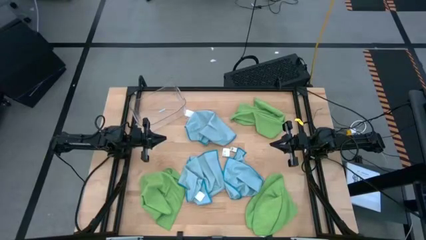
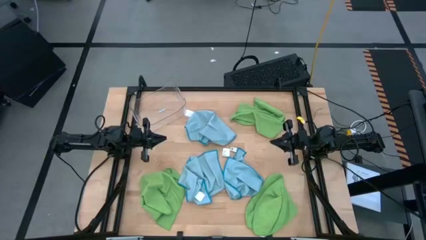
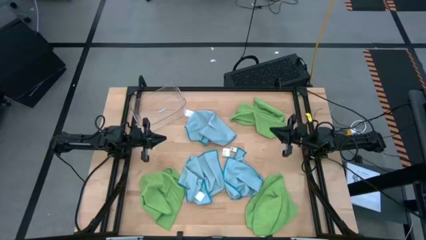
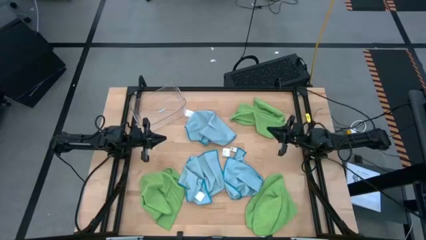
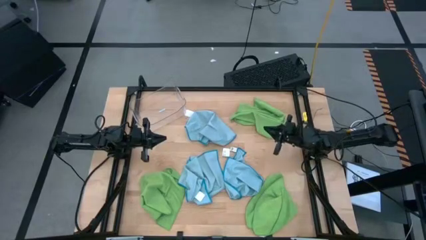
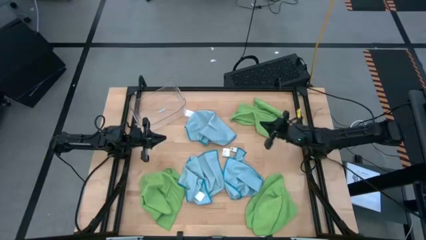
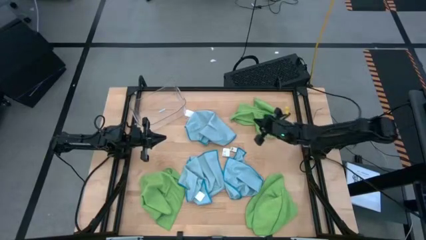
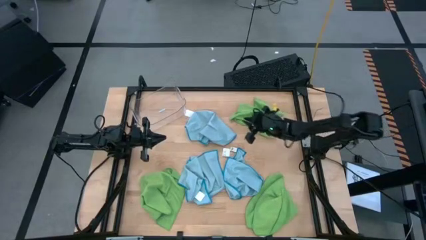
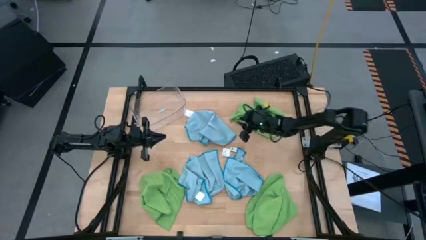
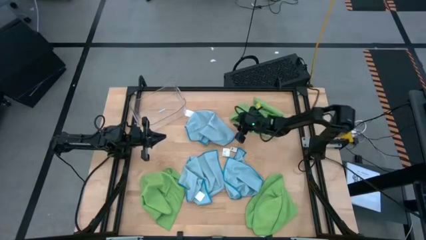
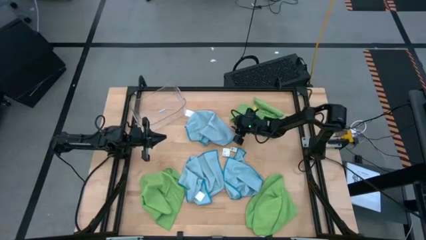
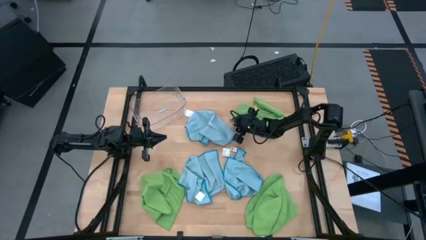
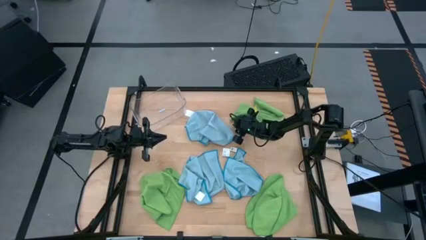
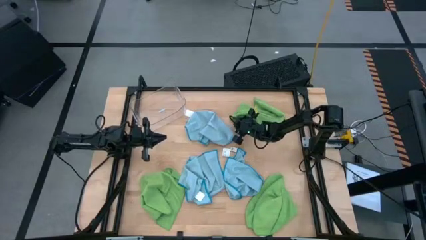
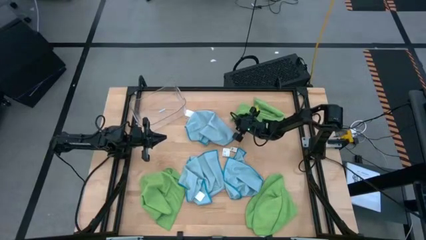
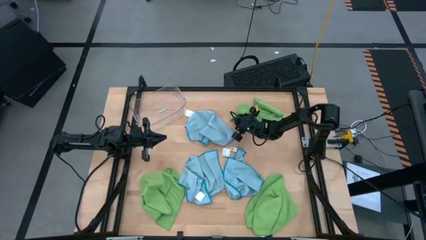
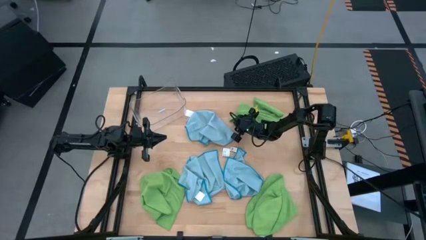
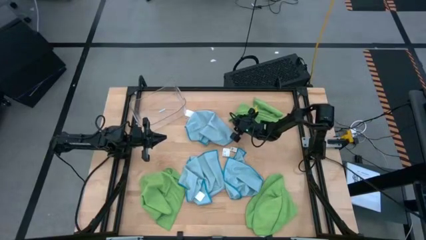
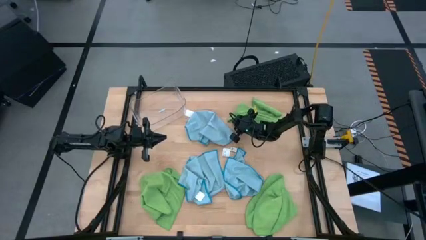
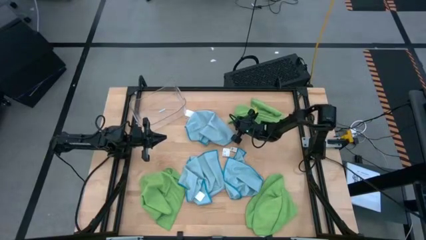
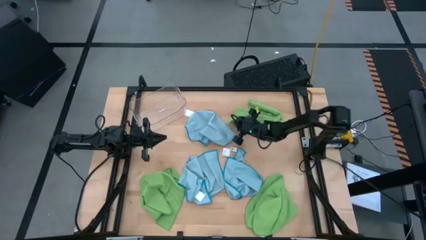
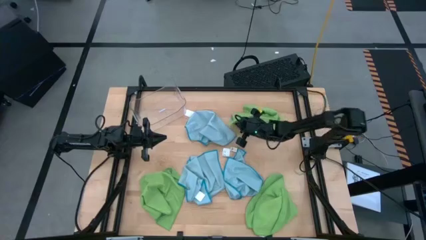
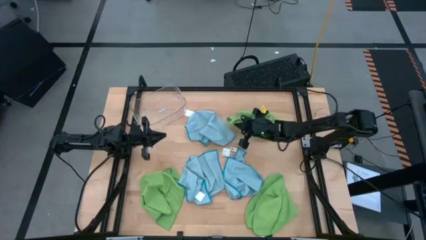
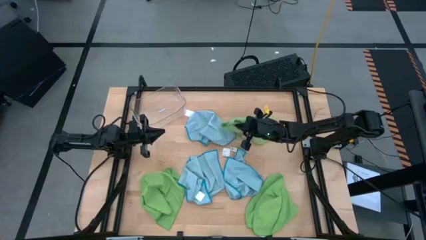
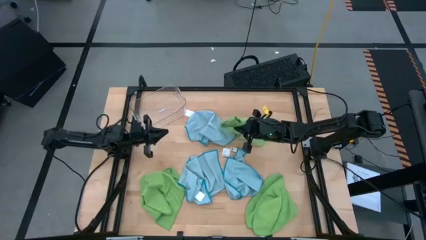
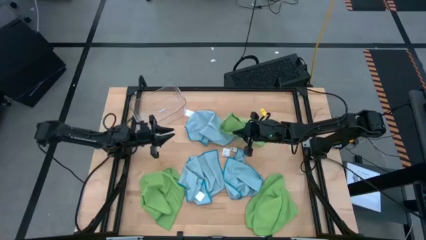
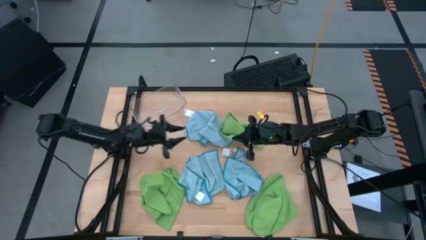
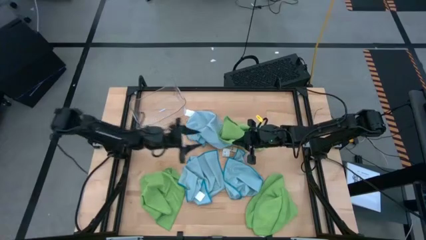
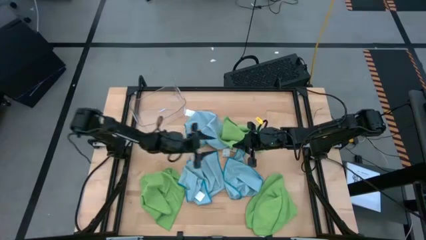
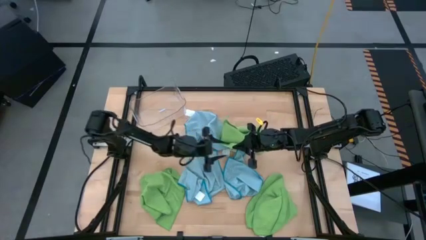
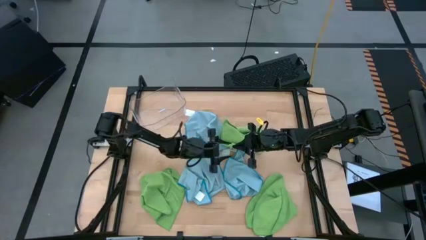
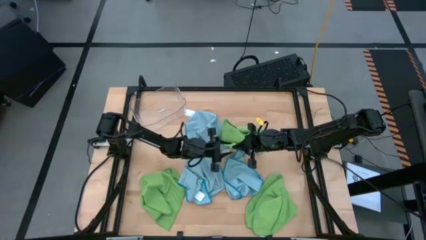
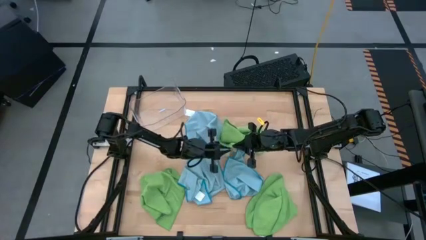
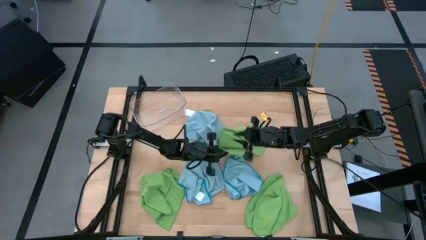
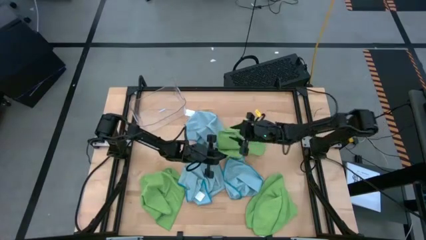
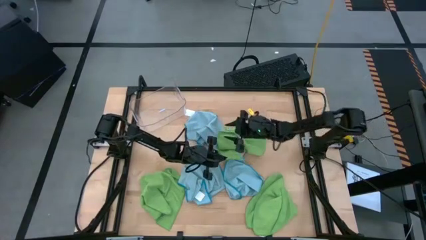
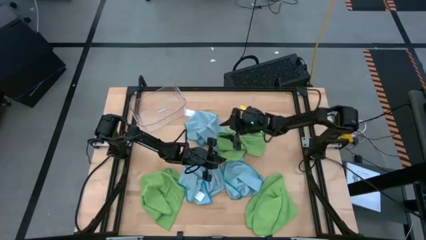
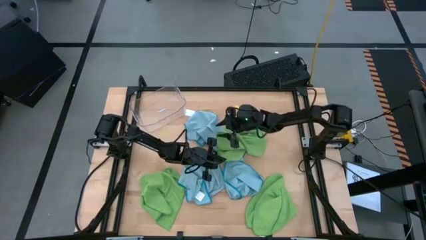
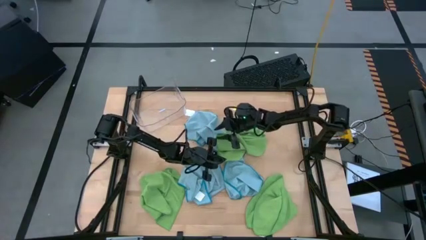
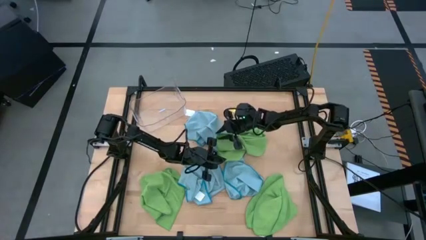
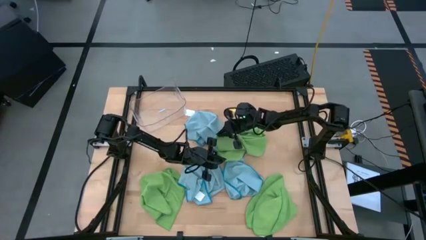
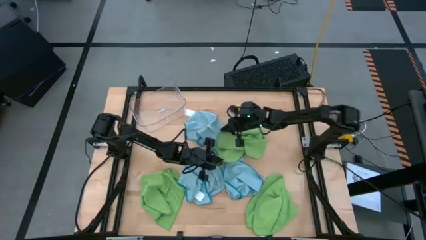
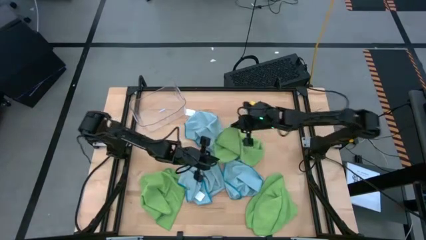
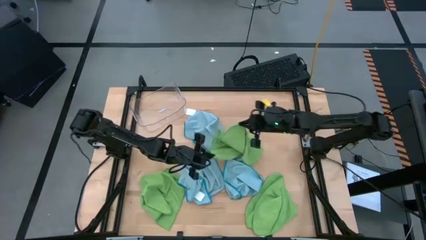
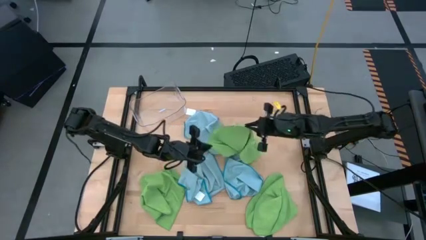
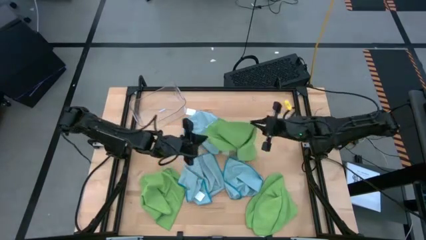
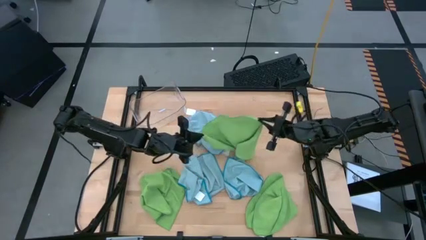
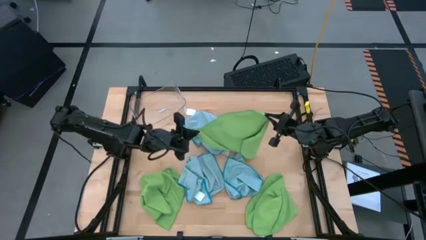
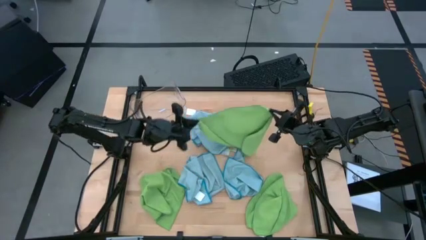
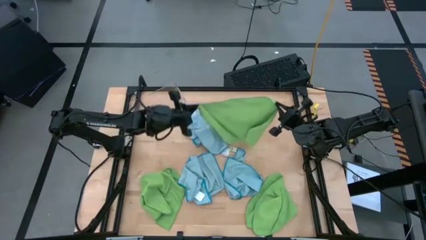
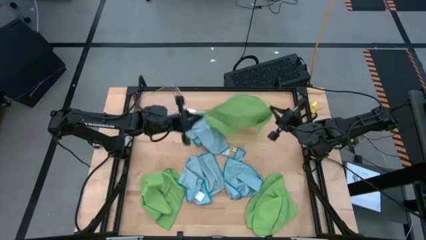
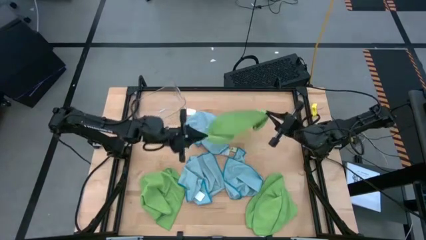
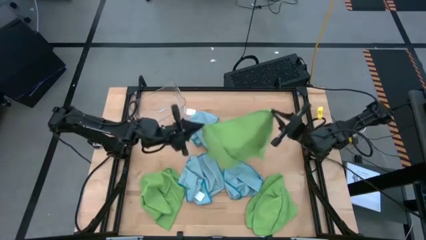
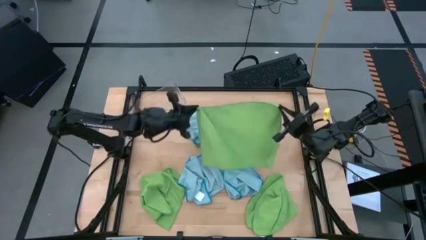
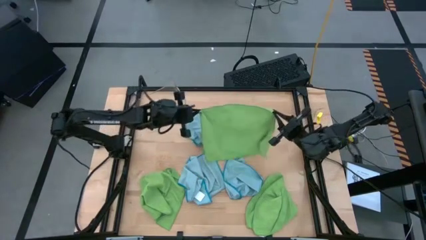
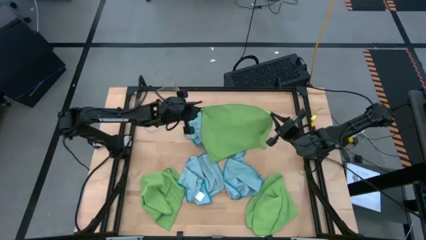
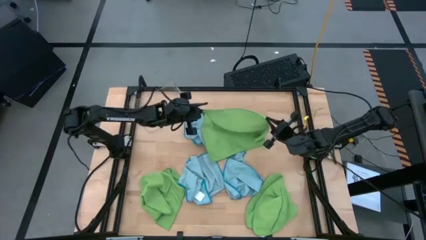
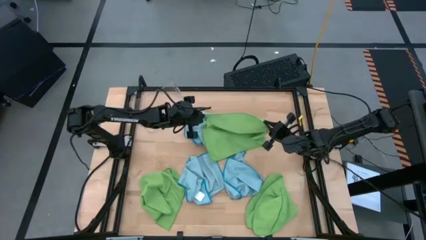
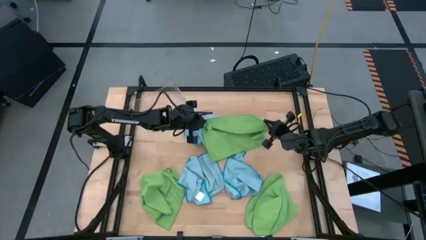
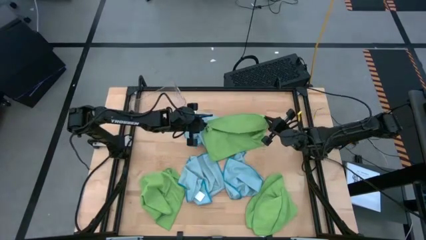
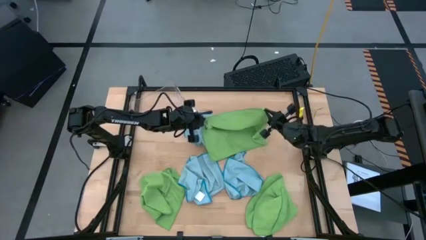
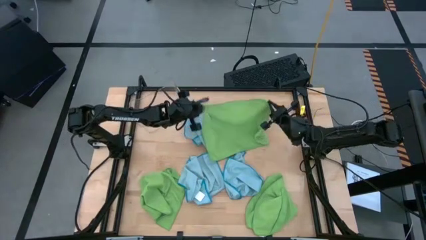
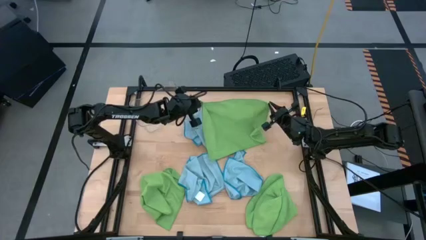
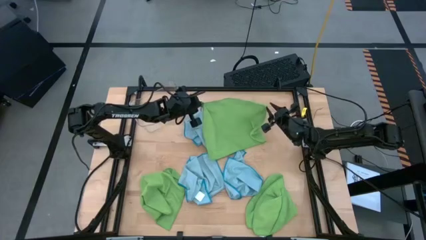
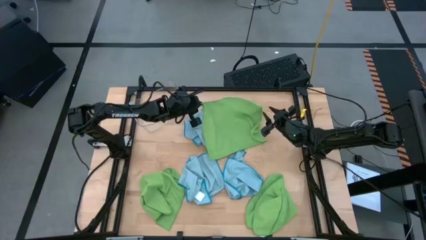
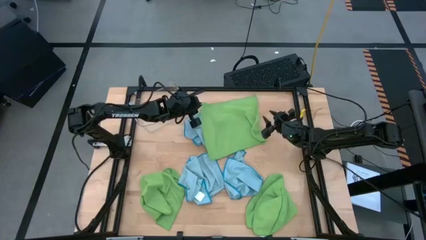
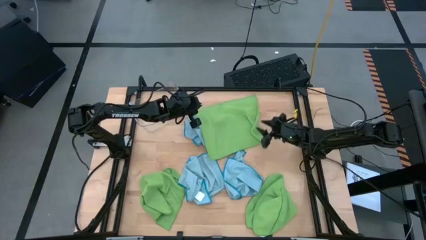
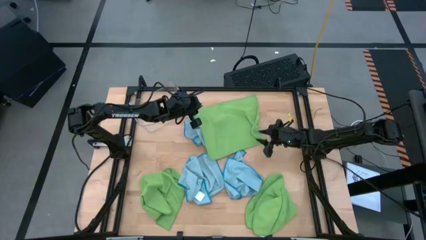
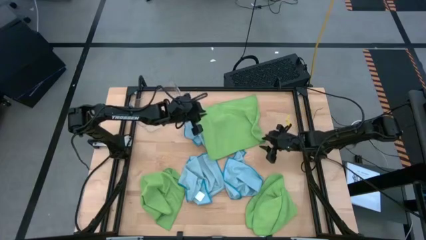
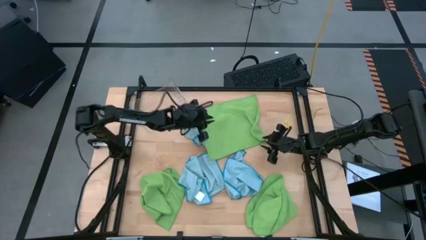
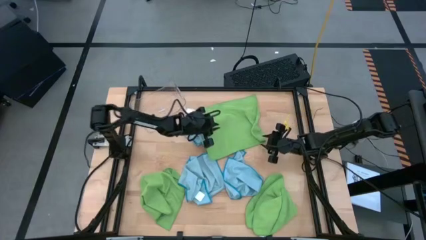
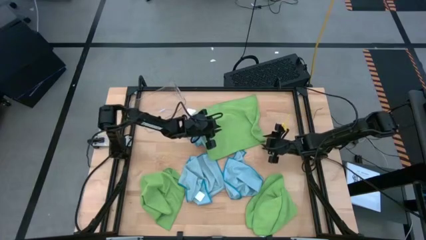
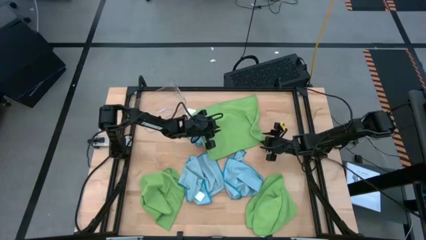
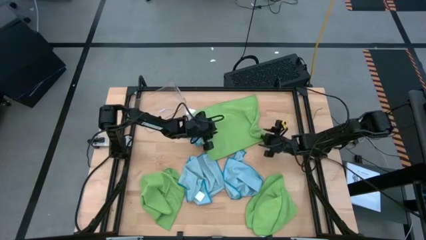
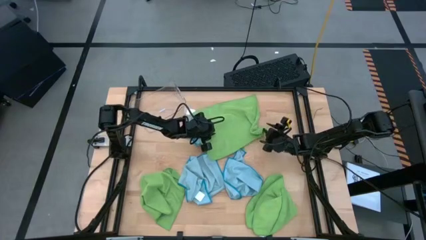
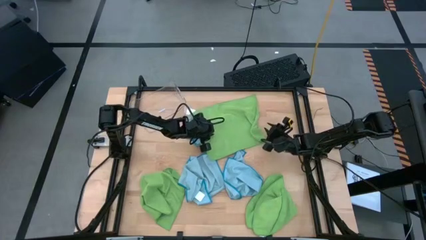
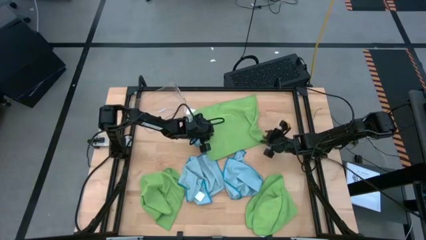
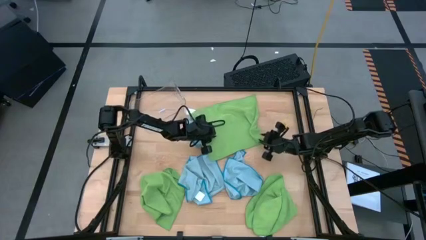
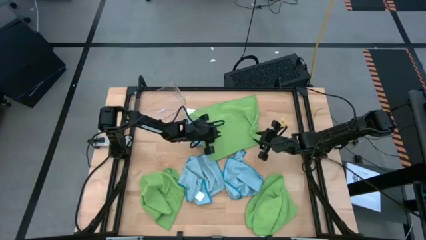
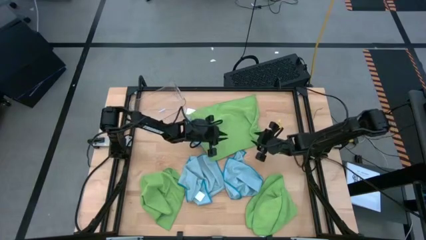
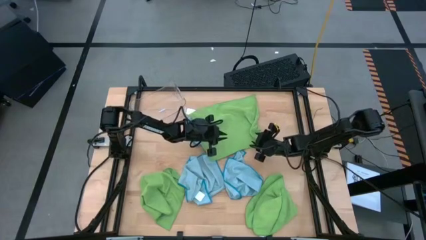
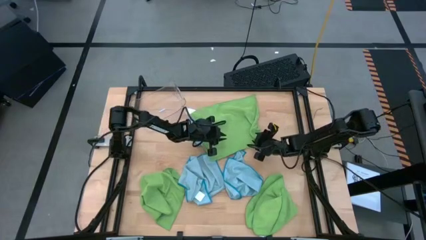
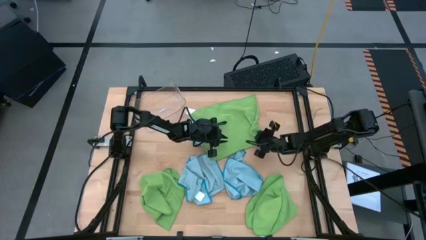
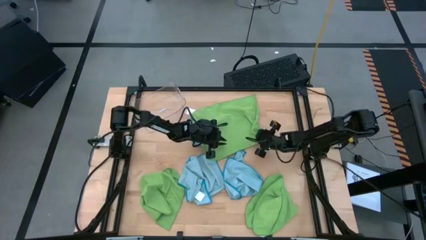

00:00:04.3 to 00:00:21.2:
Task: Fold microfiber towels
Fold the top right green microfiber cloth
